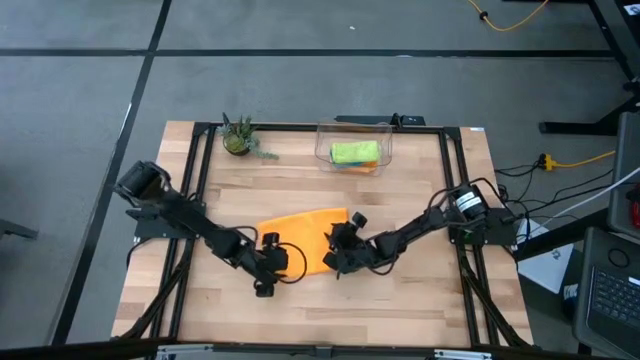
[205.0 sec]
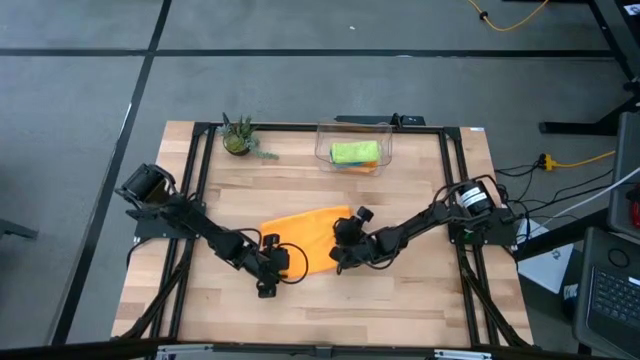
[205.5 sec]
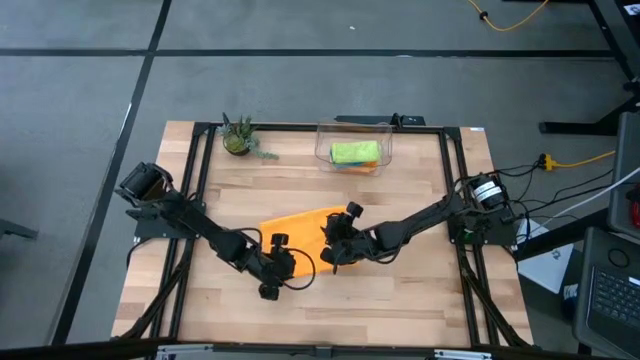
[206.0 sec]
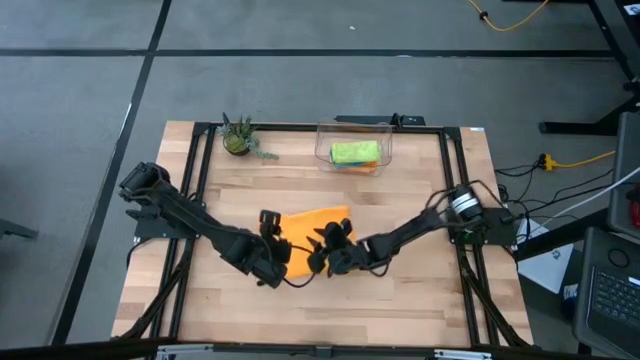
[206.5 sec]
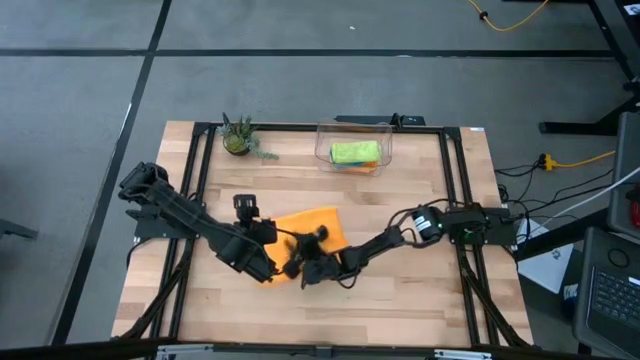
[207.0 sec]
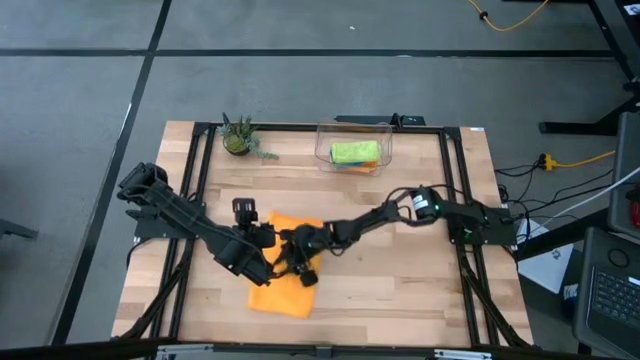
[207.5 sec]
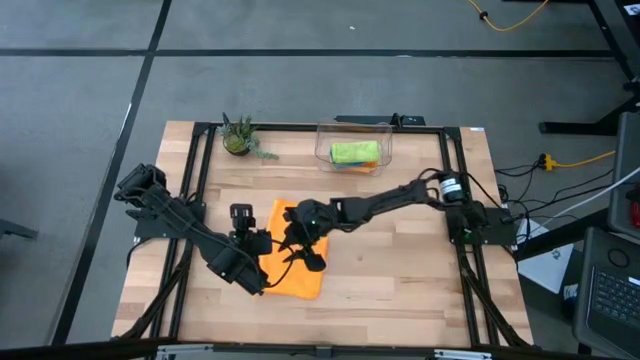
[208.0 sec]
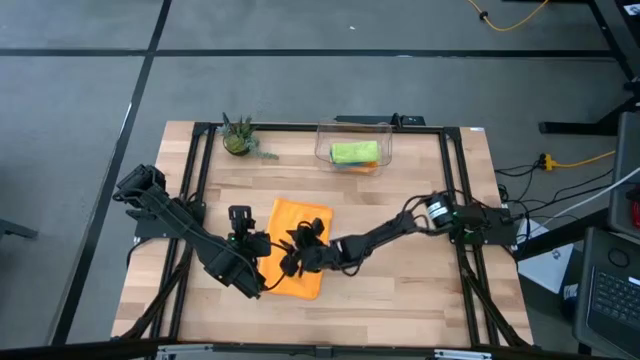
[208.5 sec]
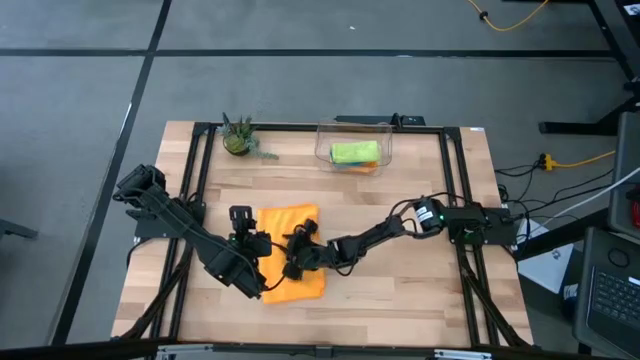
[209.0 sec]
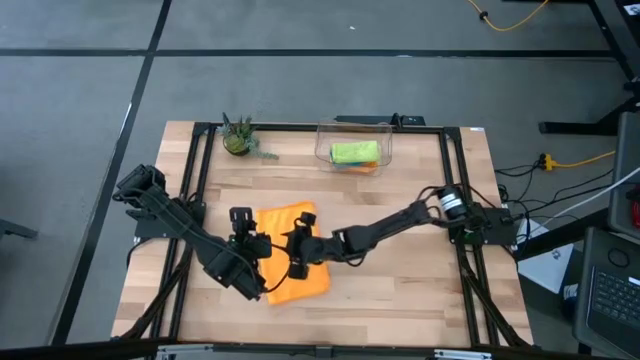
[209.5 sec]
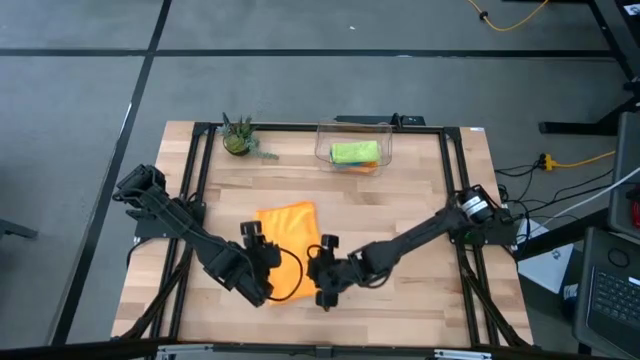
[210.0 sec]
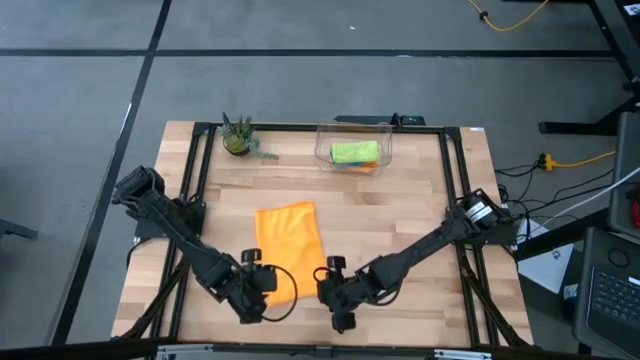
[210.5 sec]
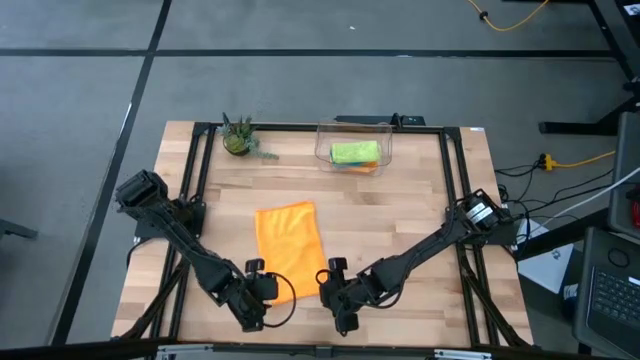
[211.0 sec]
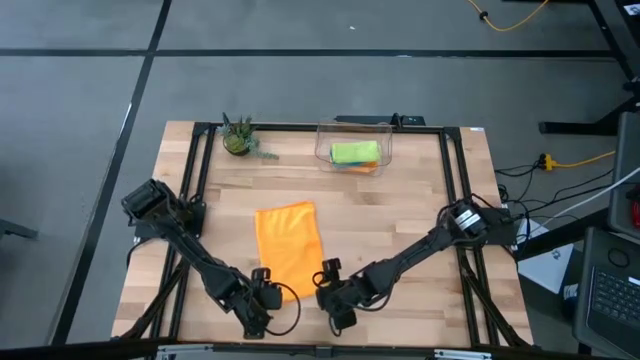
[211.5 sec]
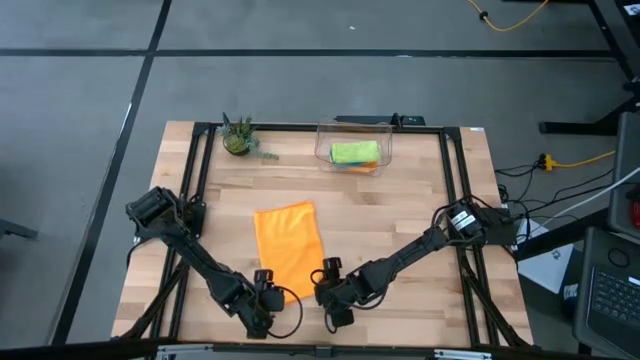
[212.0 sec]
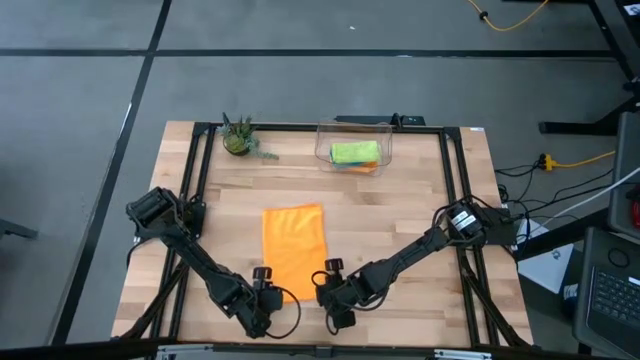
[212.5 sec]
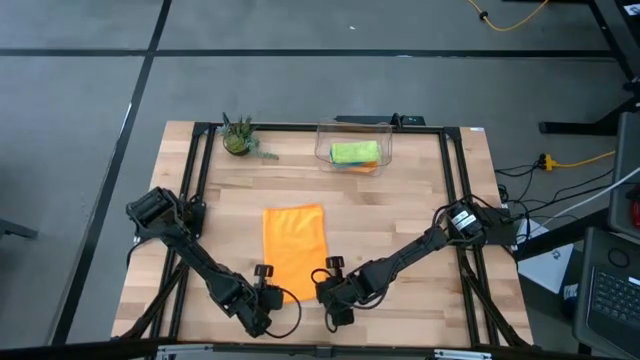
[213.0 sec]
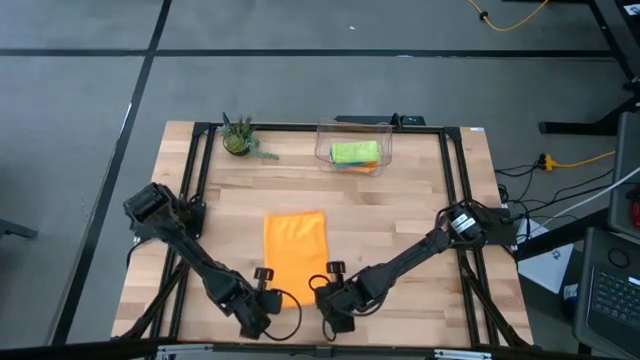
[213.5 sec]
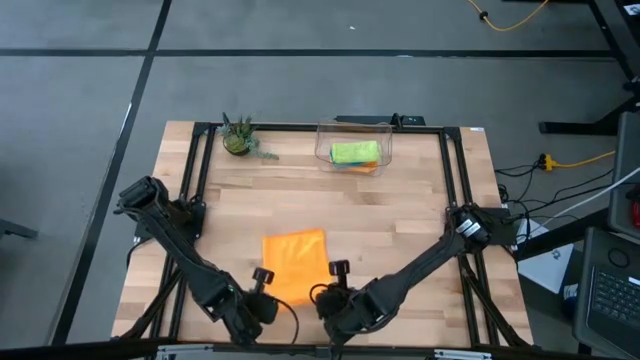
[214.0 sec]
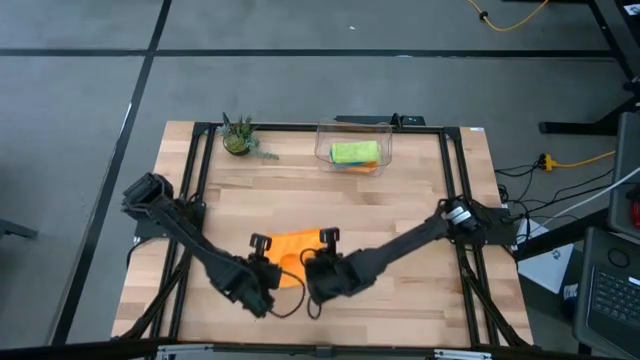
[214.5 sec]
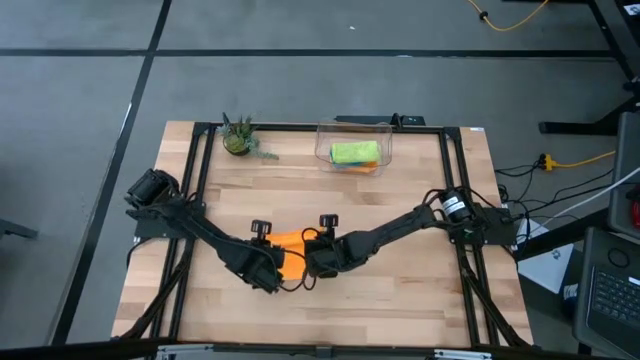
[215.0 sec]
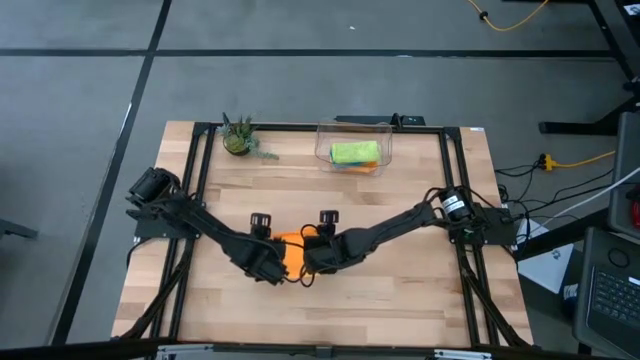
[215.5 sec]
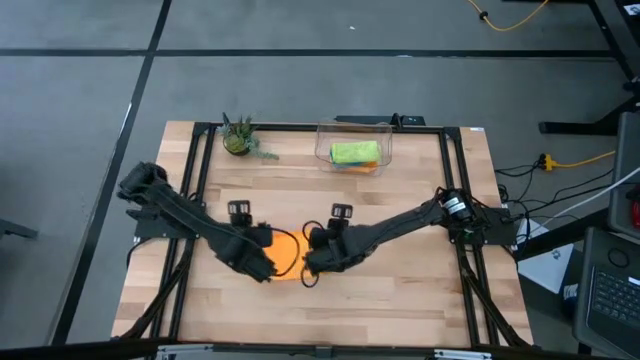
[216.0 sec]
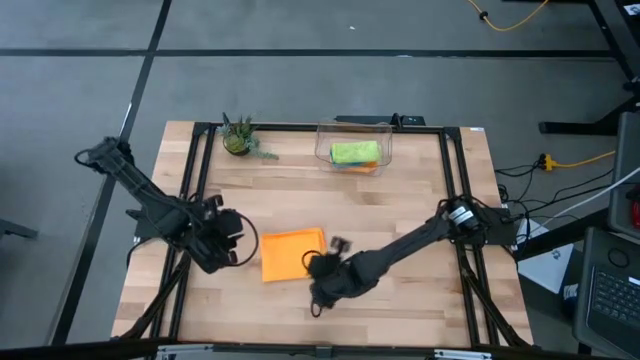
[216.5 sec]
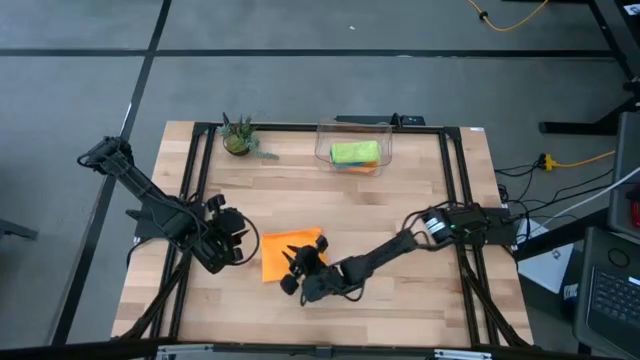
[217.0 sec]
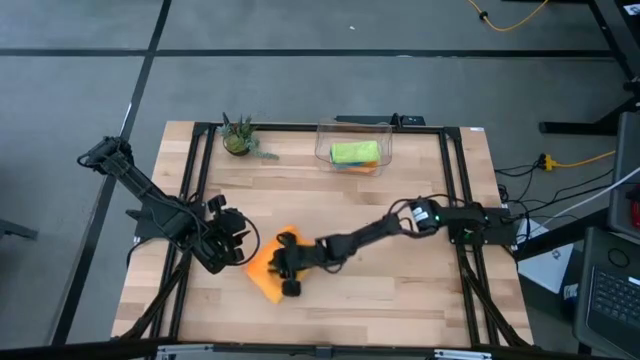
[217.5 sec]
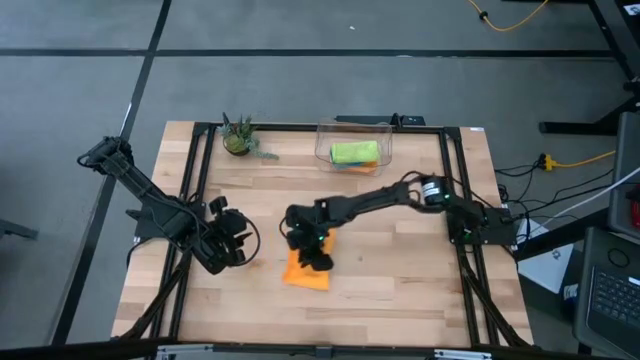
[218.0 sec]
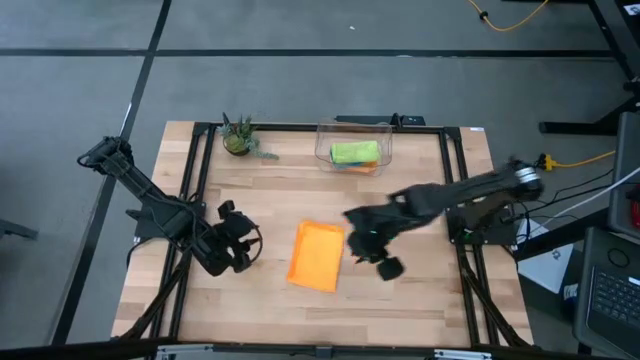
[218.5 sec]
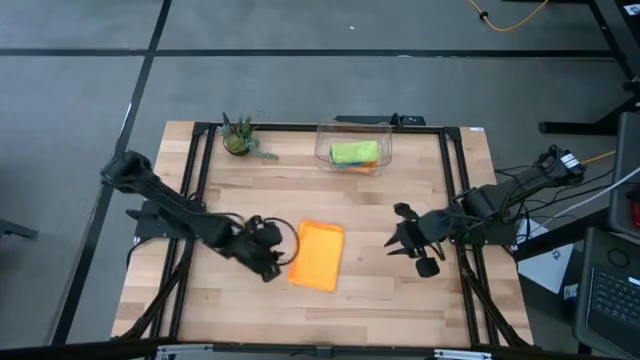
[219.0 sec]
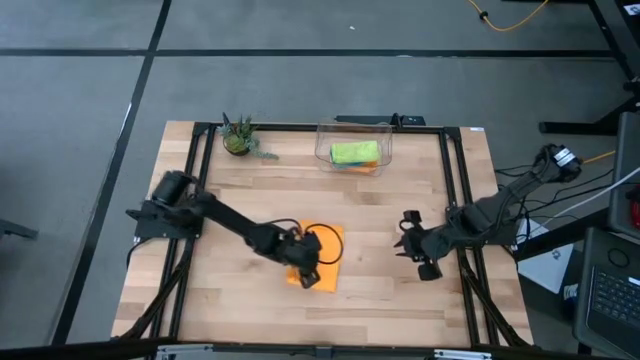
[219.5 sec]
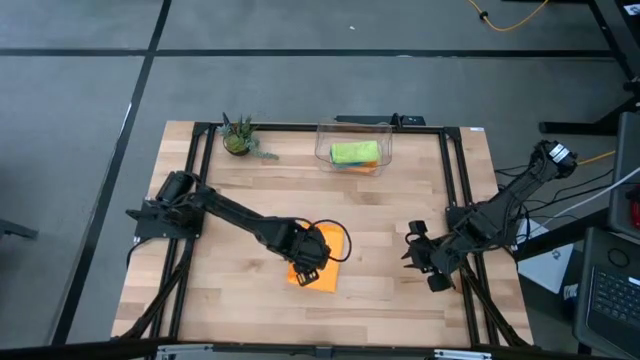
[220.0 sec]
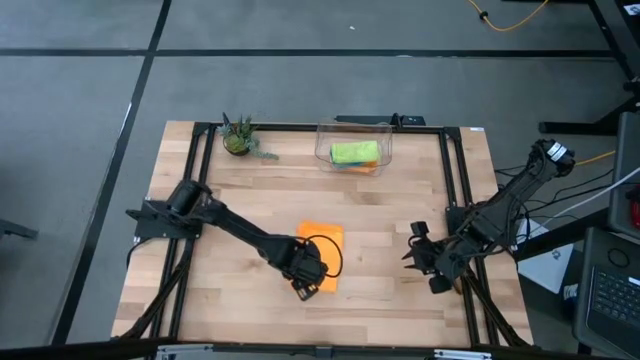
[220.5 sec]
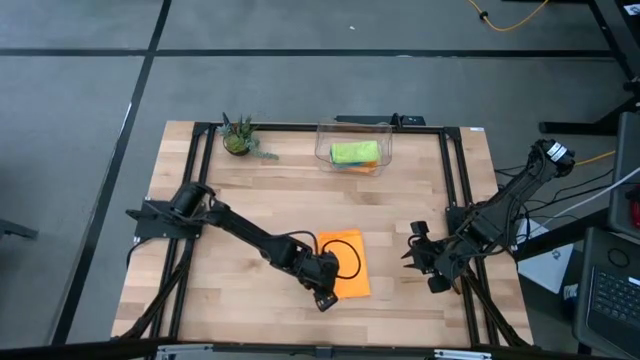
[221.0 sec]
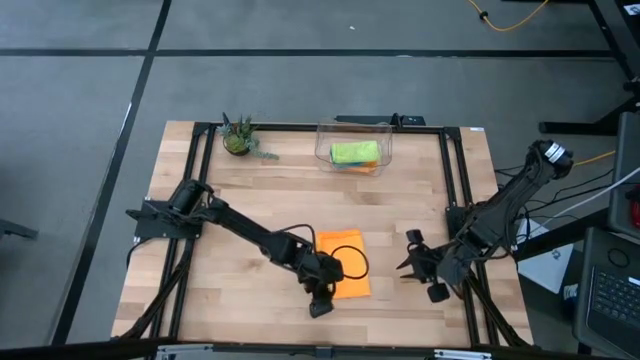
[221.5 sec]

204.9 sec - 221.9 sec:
Task: Fold microfiber towels
Fold the orange towel on the table

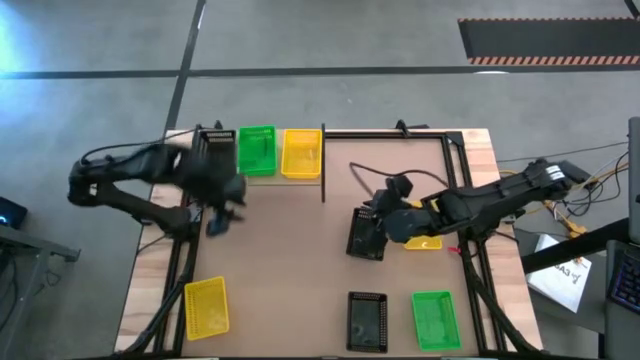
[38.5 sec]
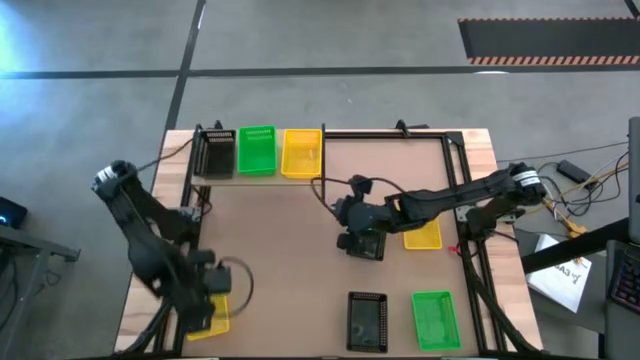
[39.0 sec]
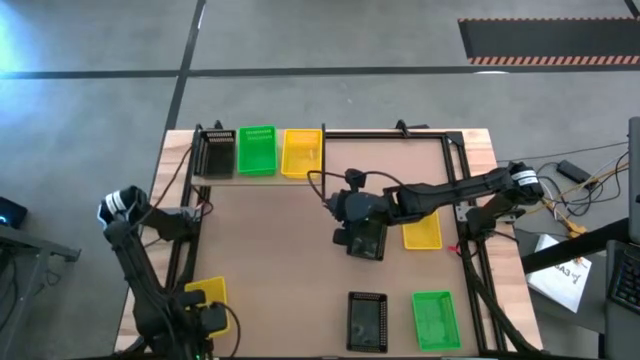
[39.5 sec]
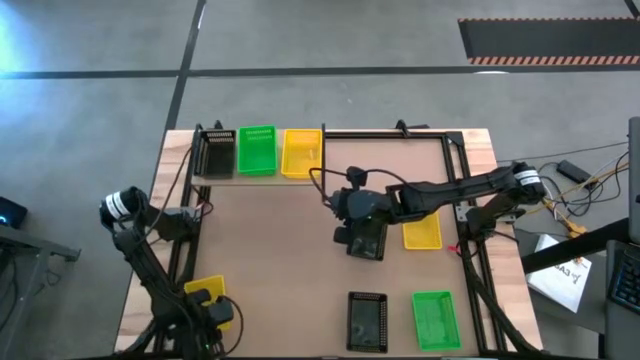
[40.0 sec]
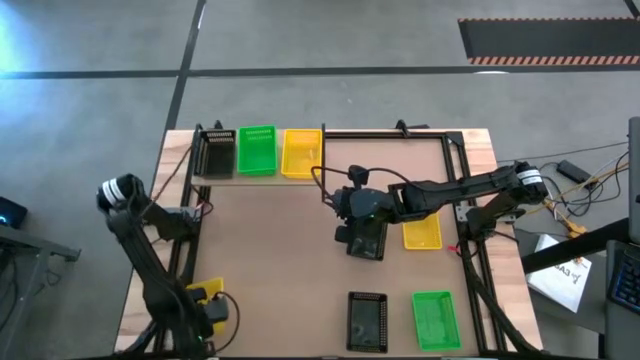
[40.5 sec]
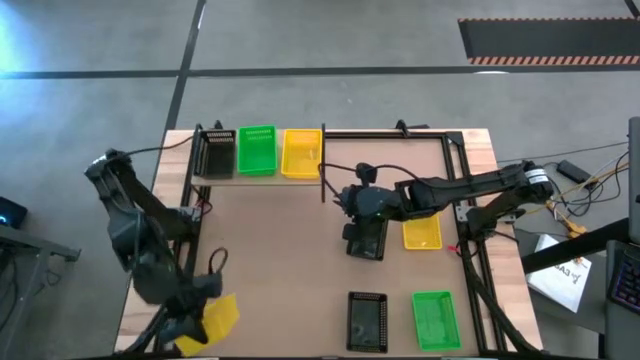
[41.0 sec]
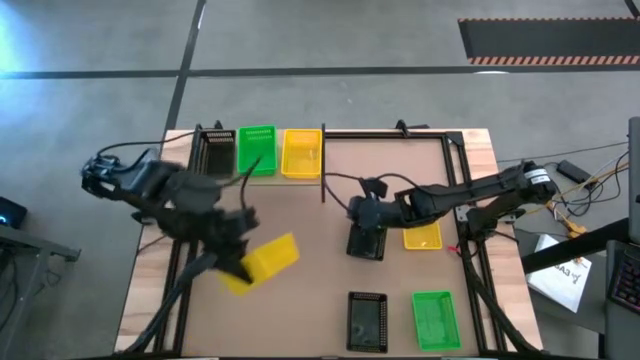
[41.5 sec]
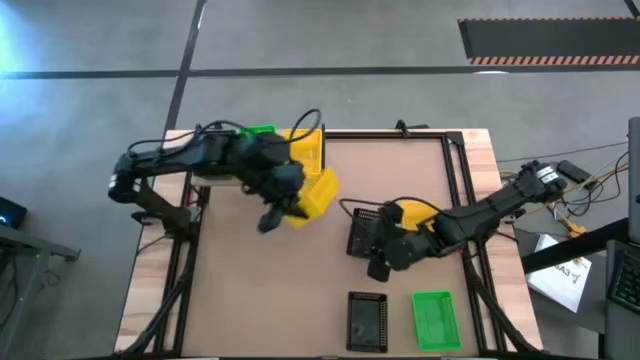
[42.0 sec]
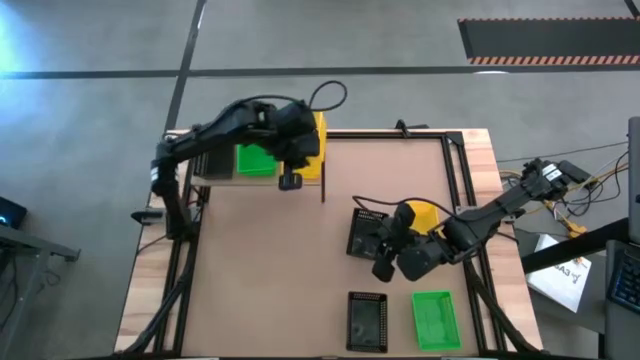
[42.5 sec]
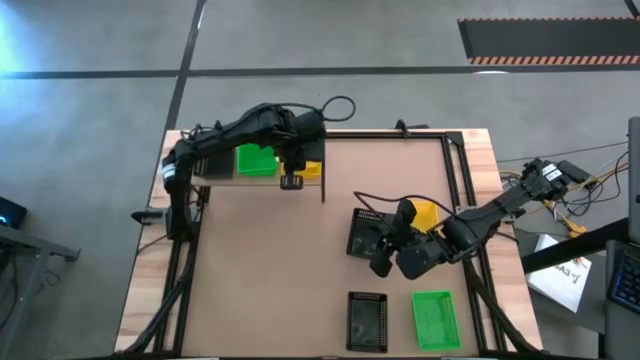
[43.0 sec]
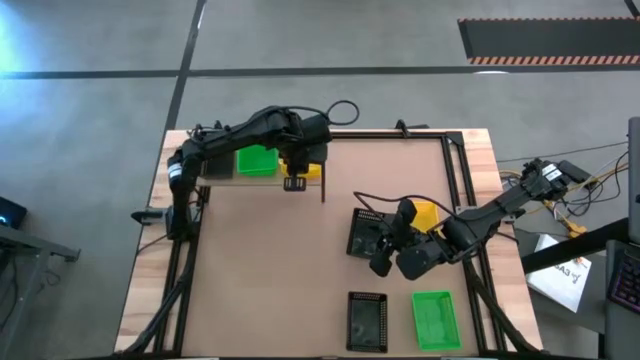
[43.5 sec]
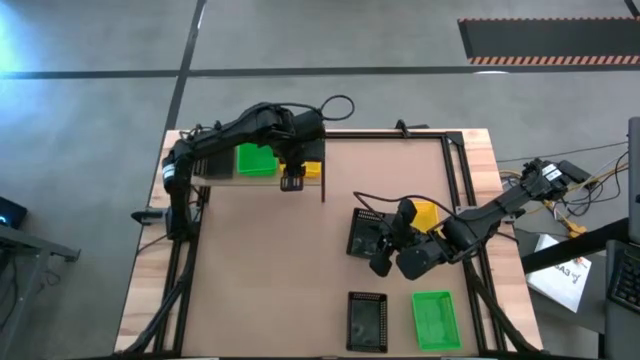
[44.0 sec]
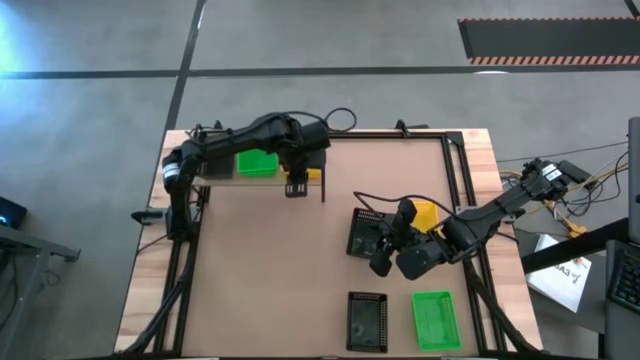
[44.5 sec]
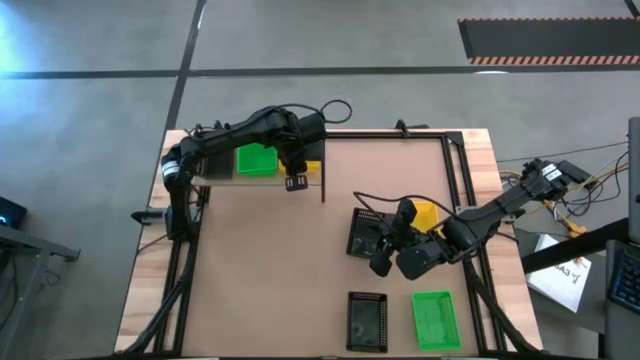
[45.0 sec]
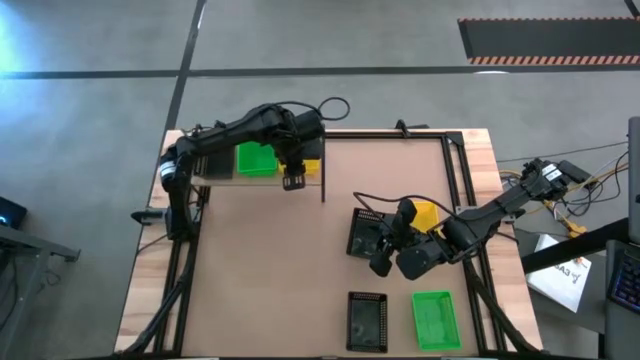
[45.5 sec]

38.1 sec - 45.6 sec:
Task: Stack baskets on shelf by color
Stack the left yellow bin on top of the other yellow bin on the shelf
